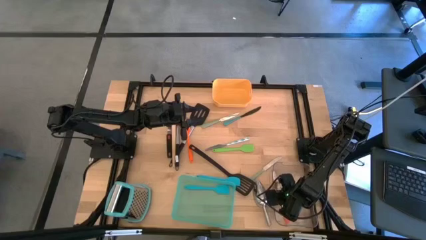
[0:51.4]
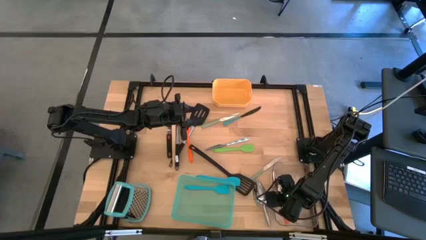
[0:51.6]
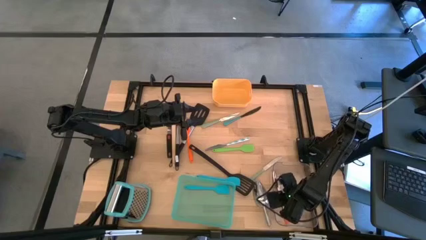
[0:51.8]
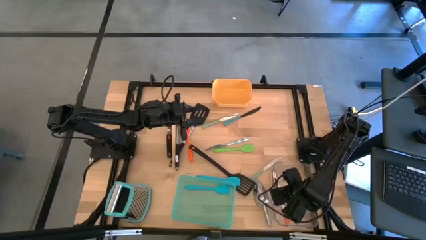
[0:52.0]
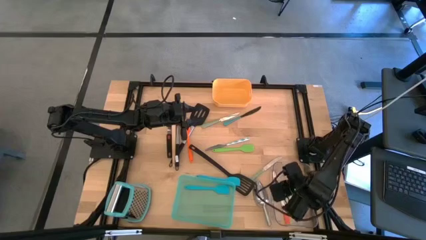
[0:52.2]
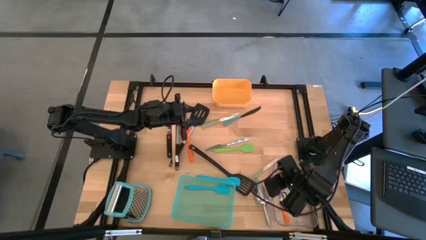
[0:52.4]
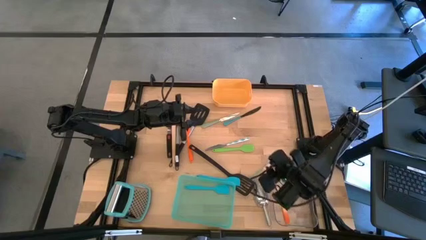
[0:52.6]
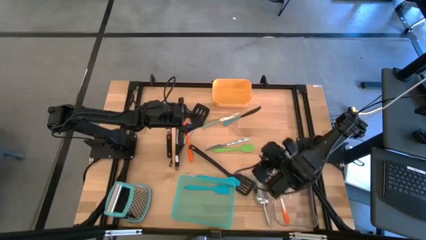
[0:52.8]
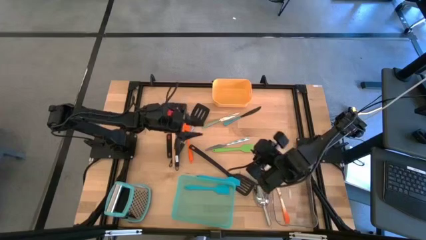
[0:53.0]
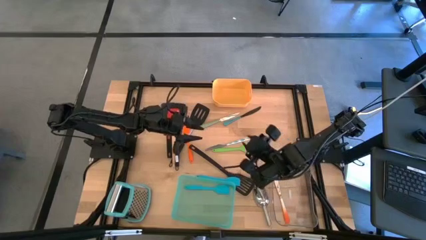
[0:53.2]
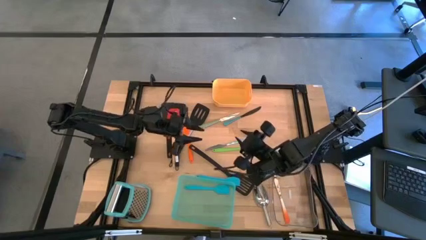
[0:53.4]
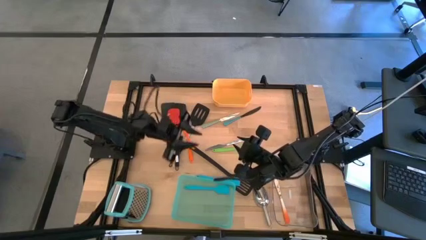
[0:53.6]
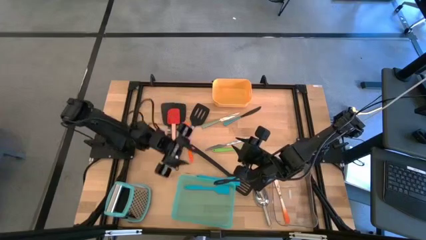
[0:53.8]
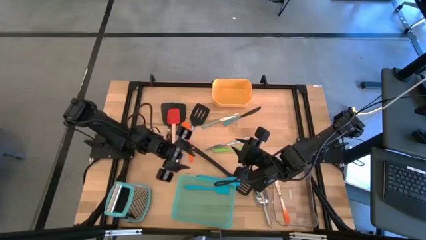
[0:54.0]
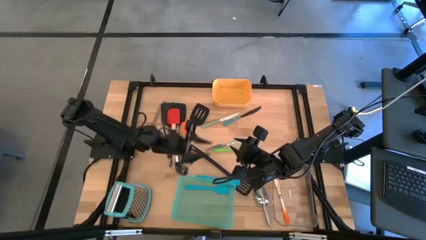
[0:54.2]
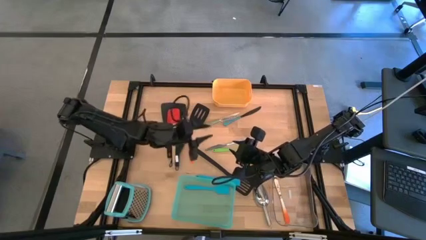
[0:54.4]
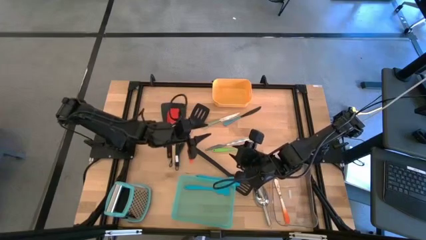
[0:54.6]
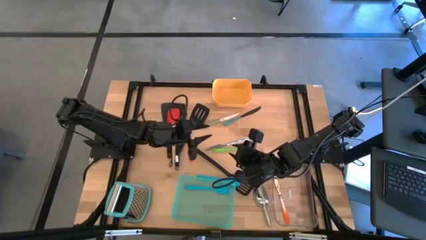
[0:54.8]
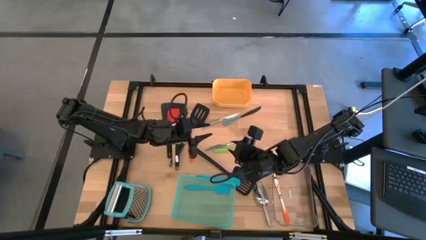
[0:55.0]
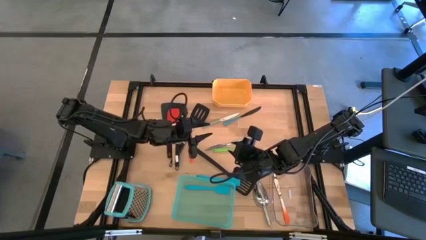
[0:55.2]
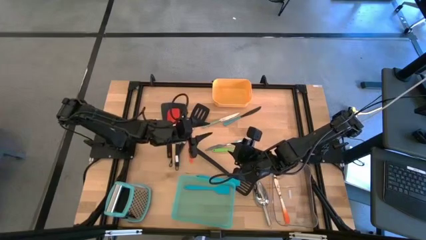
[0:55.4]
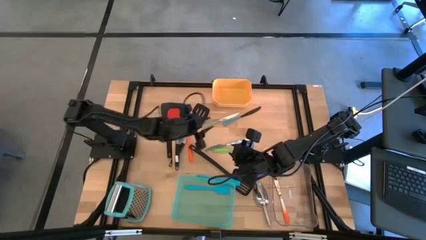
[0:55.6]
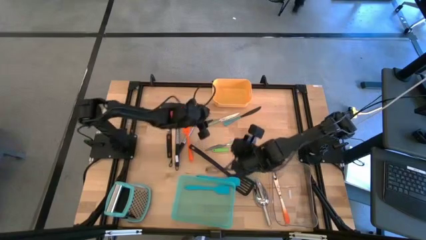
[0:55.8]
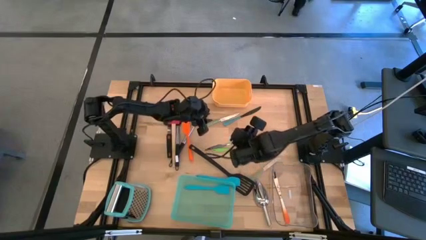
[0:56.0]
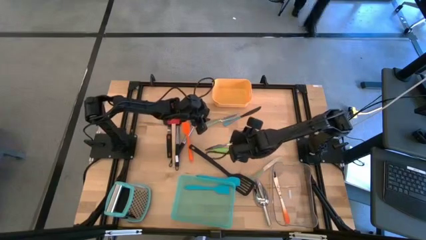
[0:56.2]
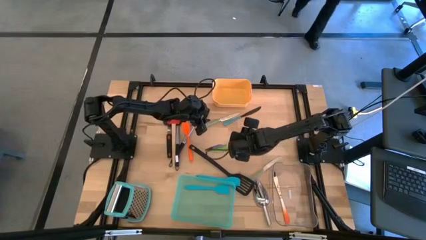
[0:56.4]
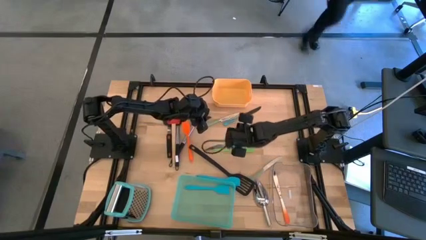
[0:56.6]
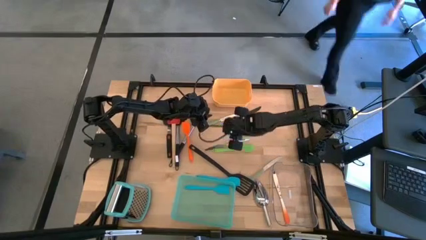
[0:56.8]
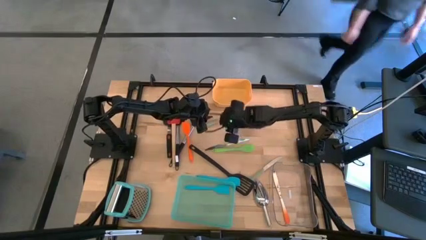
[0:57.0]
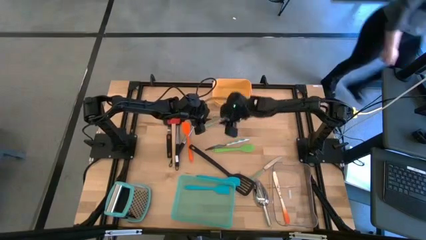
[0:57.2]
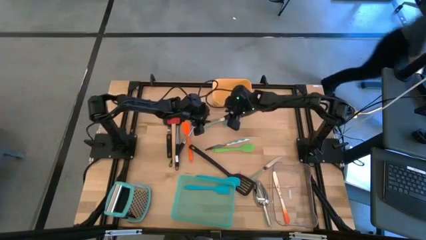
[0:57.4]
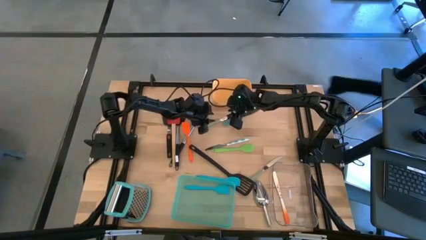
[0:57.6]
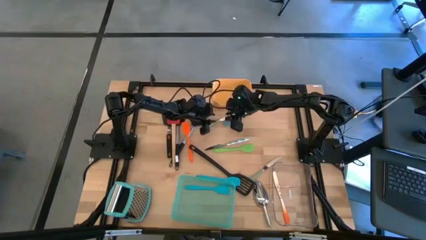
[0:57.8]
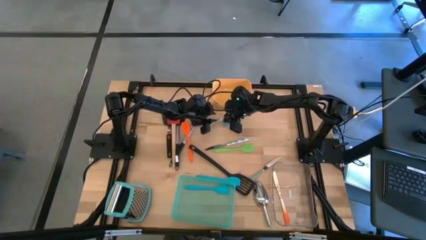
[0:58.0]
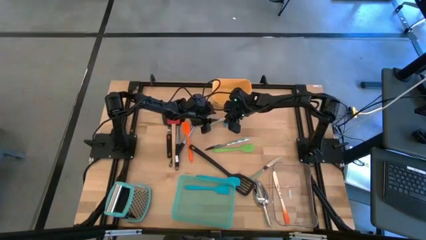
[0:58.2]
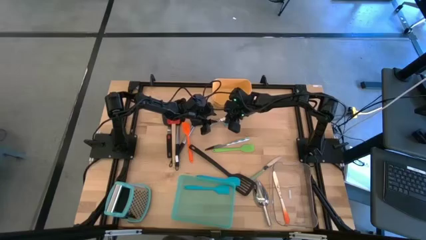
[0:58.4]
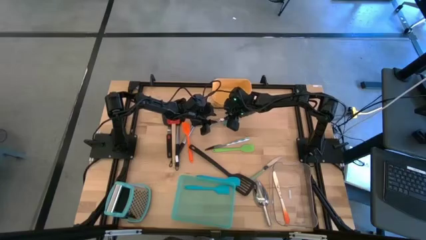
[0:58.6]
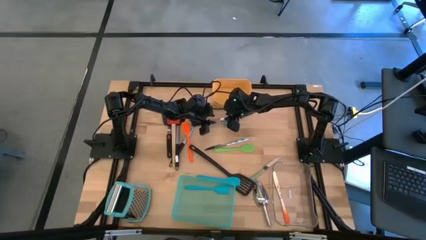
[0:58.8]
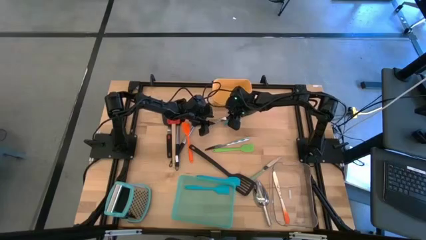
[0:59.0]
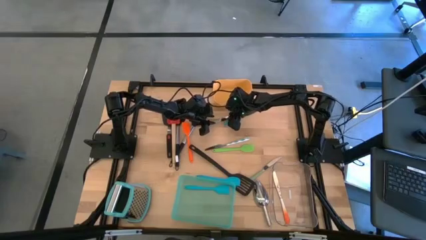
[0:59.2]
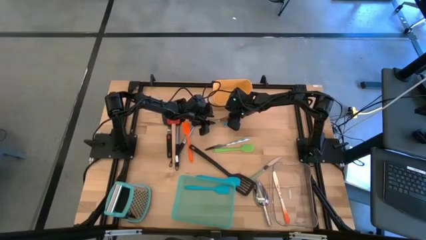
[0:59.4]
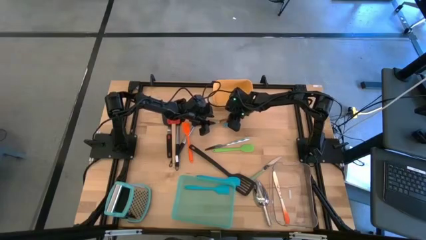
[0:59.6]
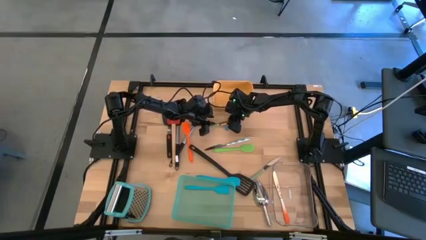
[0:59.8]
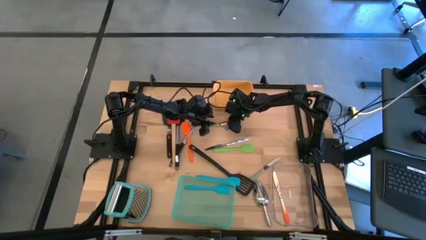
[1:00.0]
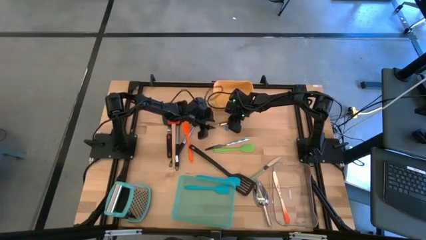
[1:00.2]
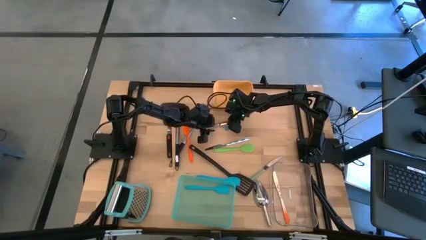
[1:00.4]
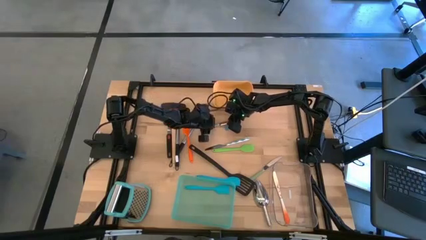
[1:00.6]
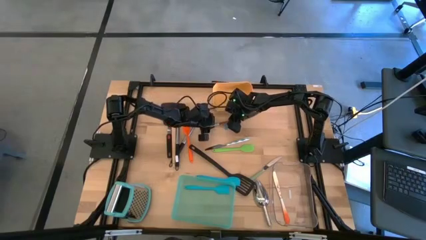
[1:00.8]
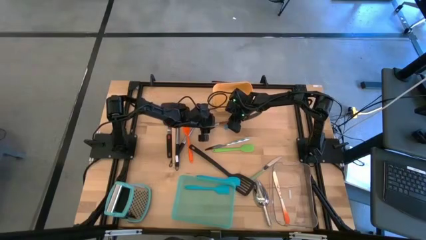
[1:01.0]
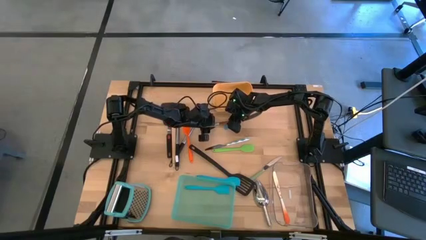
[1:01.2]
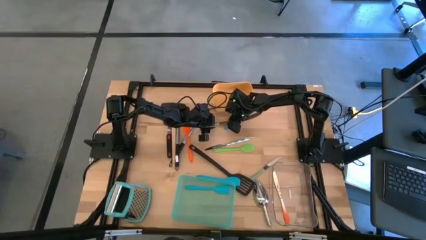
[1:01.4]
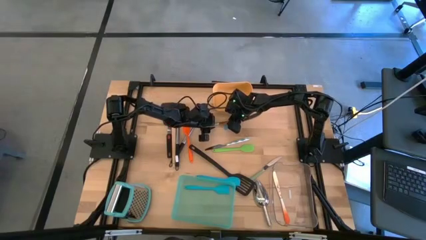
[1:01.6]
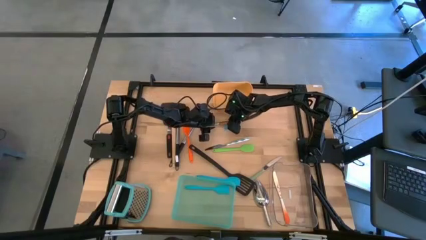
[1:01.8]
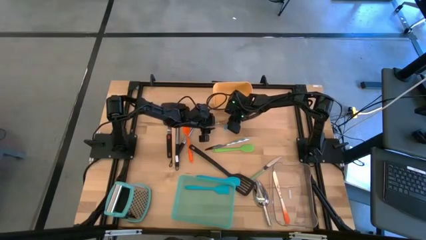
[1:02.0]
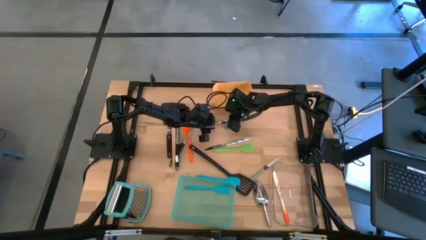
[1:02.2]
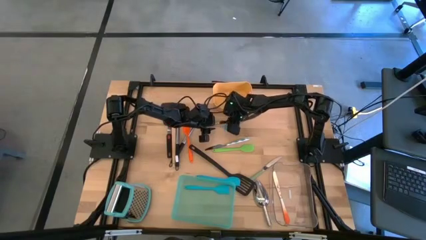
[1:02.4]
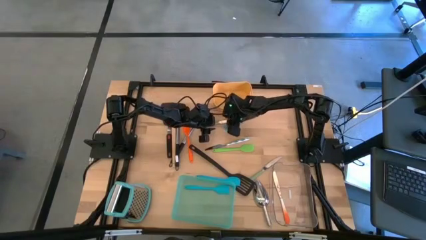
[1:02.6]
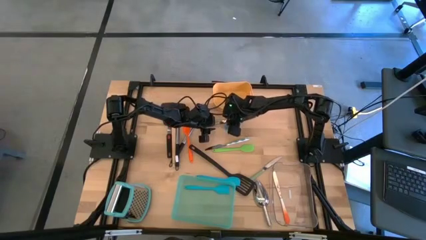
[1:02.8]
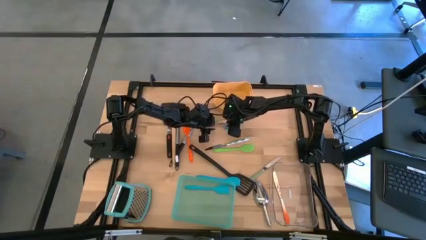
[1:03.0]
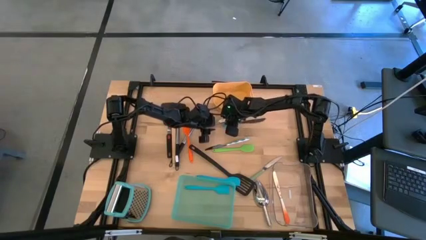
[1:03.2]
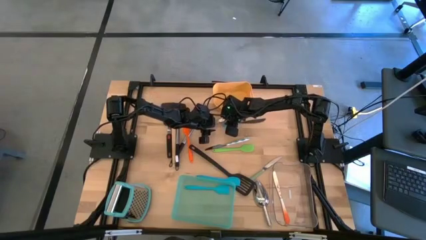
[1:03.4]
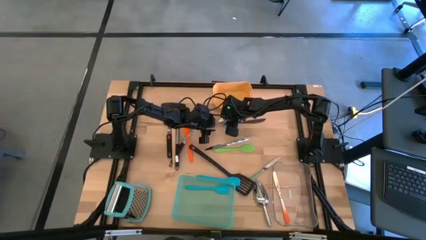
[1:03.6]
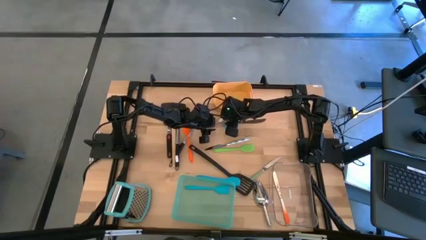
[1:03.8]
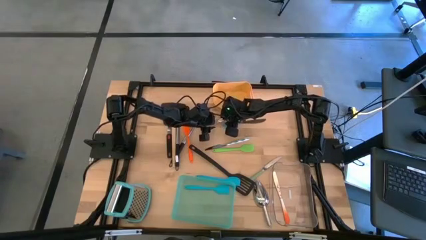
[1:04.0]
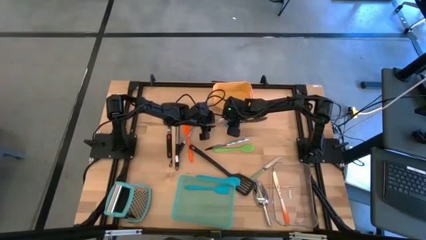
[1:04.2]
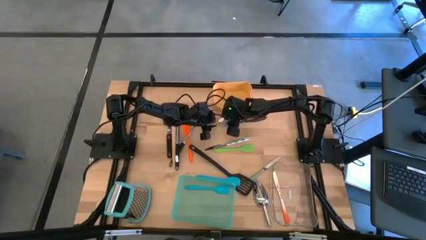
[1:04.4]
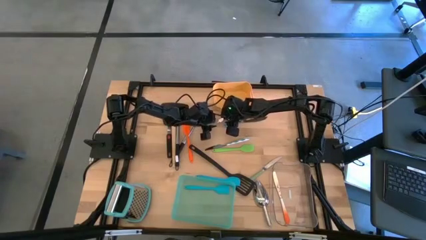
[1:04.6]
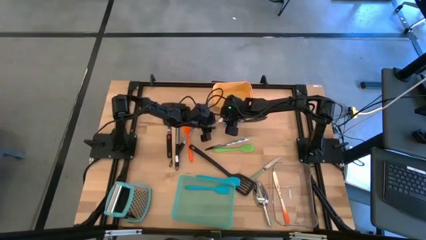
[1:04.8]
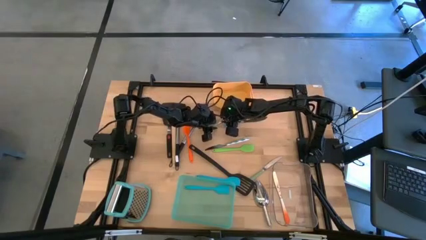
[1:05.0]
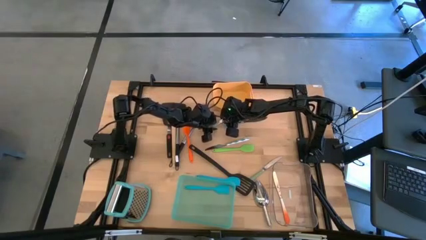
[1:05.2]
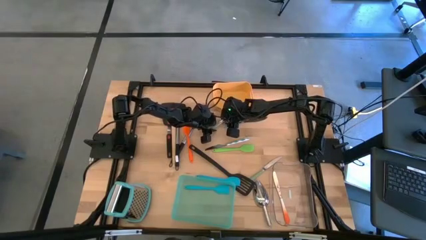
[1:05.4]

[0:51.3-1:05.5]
Task: Pick & Place Kitchen Items
Put the green table knife into the transparent bin
